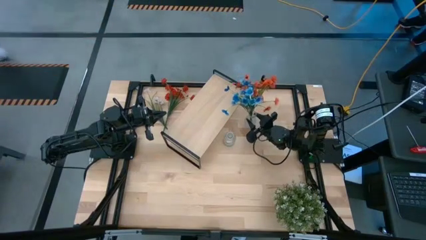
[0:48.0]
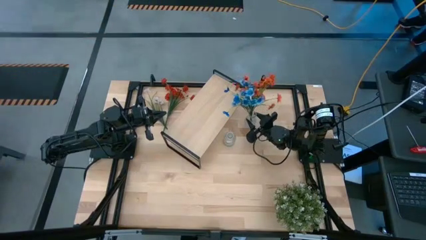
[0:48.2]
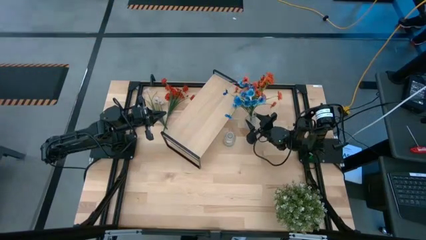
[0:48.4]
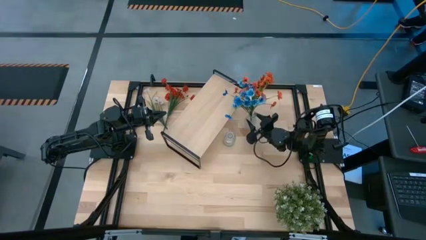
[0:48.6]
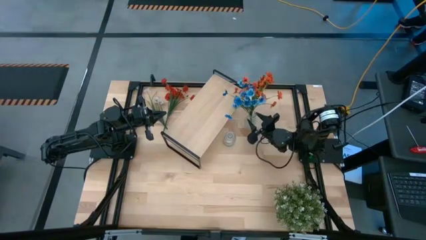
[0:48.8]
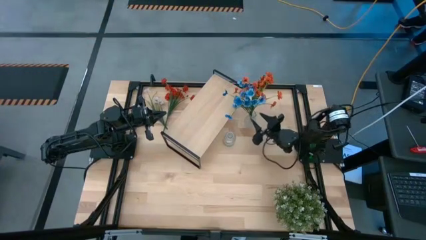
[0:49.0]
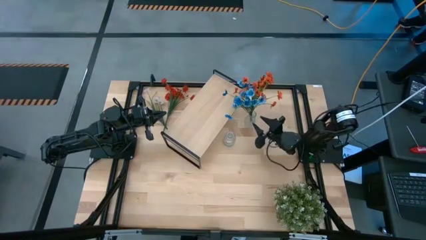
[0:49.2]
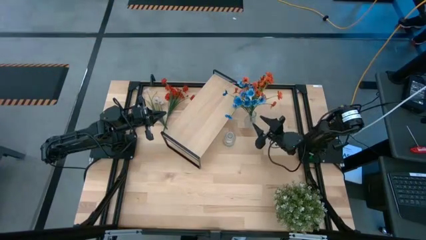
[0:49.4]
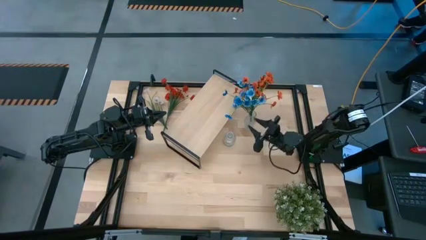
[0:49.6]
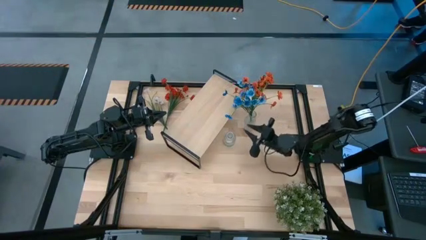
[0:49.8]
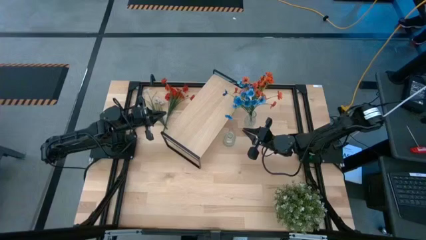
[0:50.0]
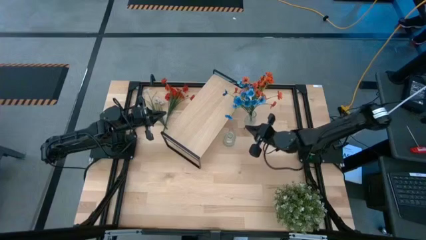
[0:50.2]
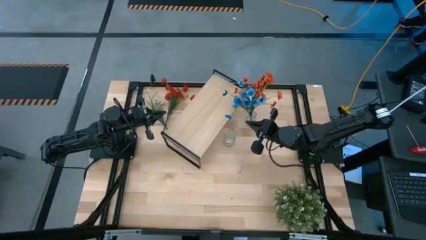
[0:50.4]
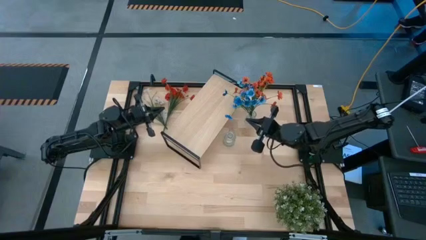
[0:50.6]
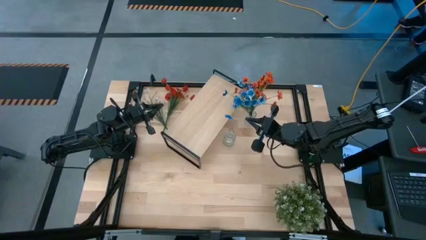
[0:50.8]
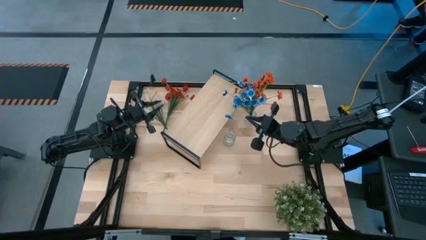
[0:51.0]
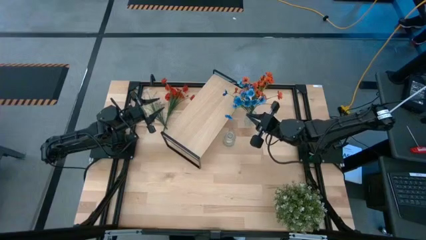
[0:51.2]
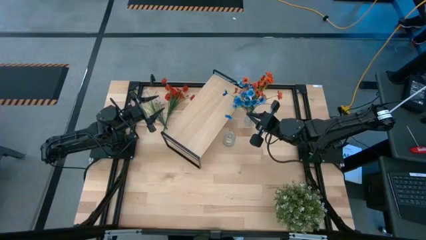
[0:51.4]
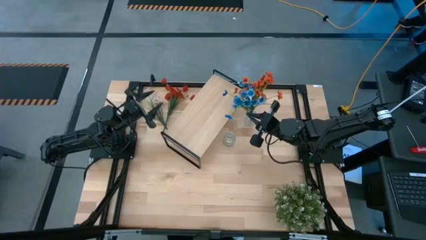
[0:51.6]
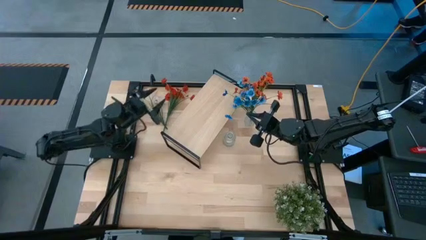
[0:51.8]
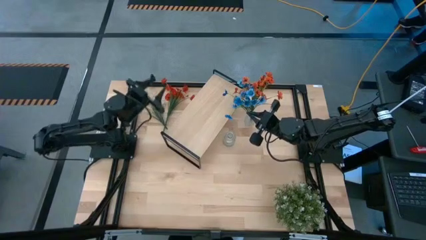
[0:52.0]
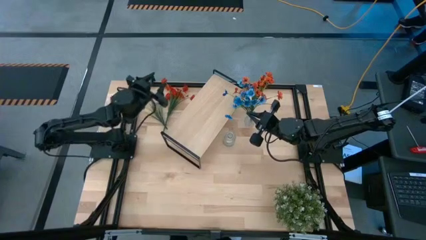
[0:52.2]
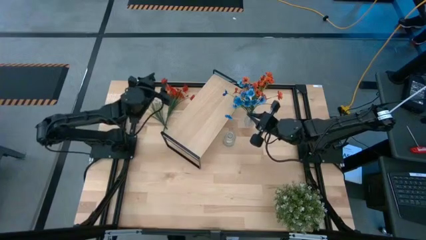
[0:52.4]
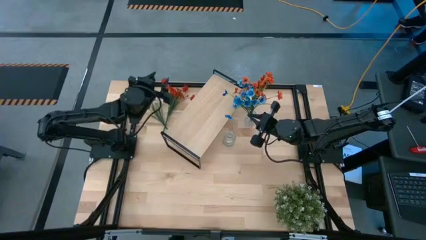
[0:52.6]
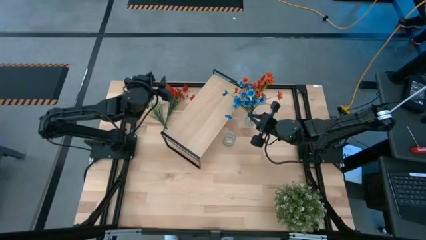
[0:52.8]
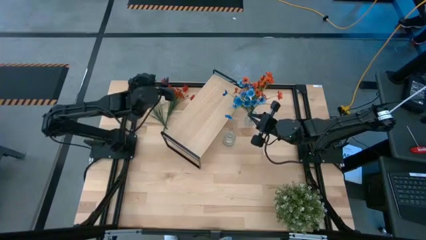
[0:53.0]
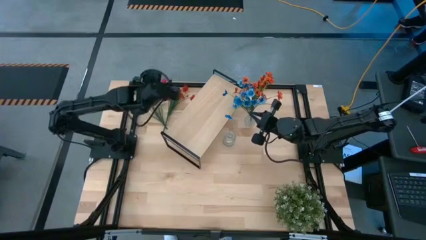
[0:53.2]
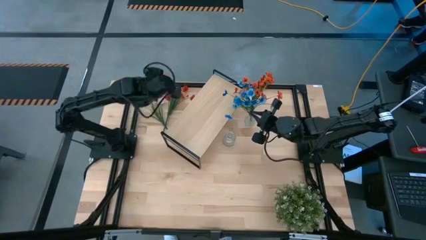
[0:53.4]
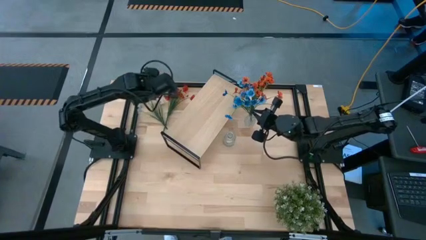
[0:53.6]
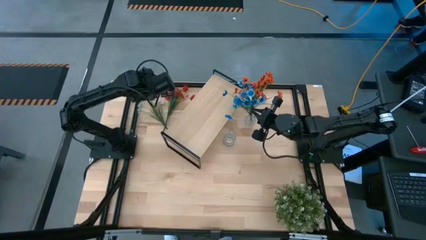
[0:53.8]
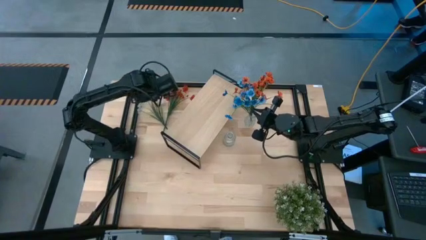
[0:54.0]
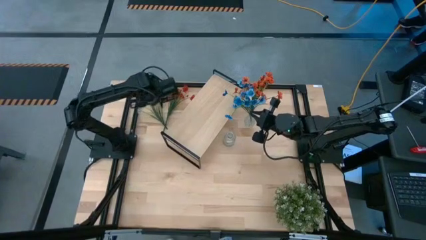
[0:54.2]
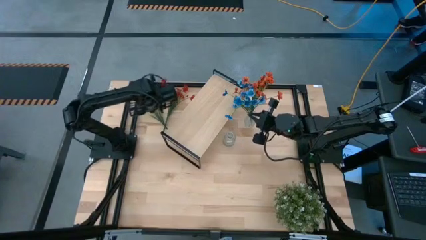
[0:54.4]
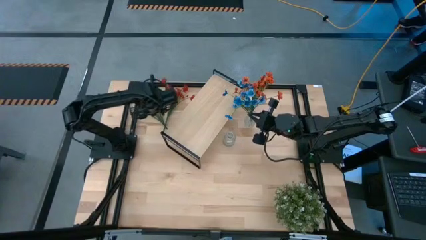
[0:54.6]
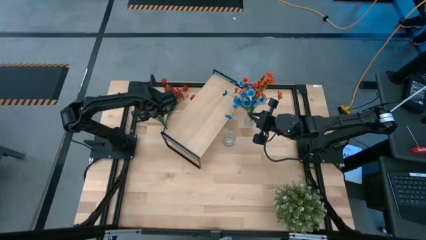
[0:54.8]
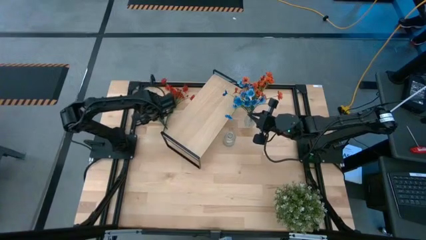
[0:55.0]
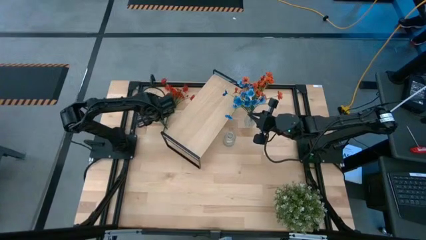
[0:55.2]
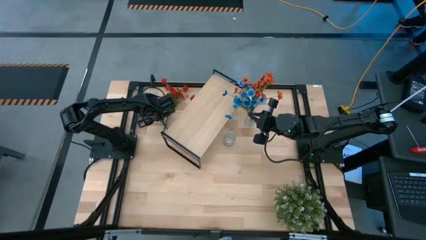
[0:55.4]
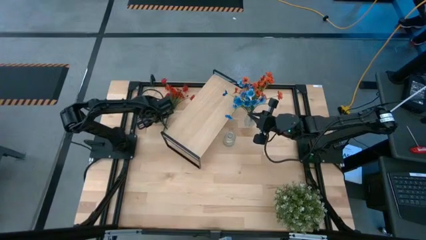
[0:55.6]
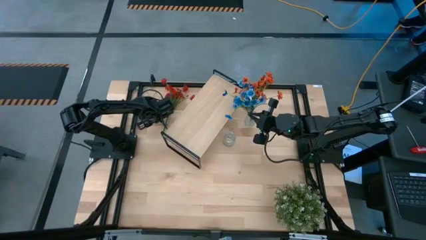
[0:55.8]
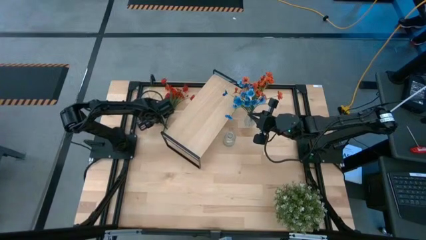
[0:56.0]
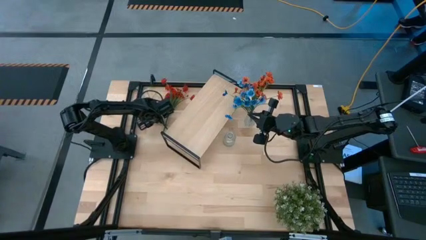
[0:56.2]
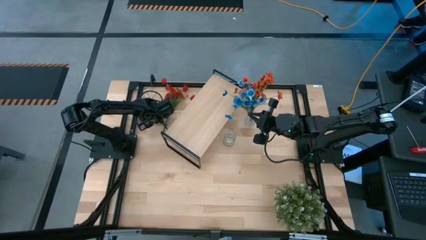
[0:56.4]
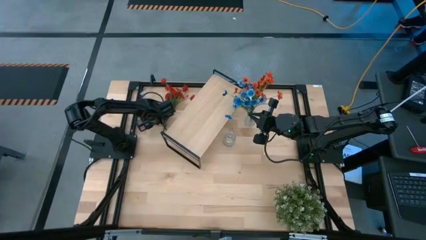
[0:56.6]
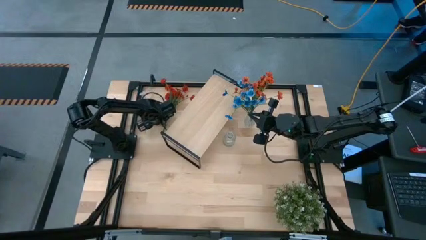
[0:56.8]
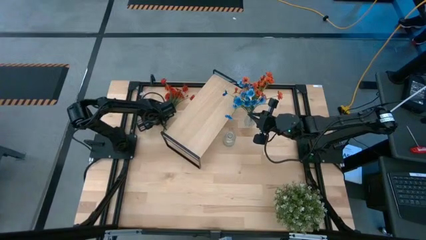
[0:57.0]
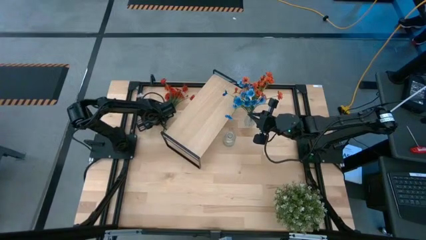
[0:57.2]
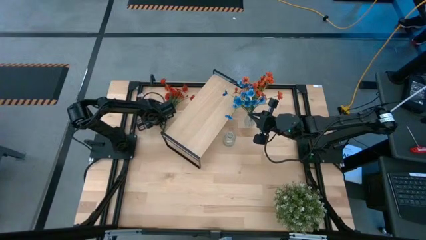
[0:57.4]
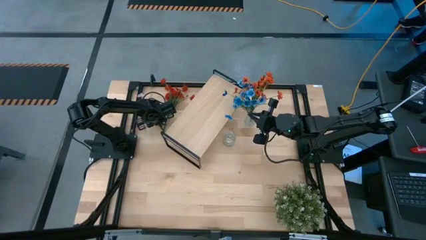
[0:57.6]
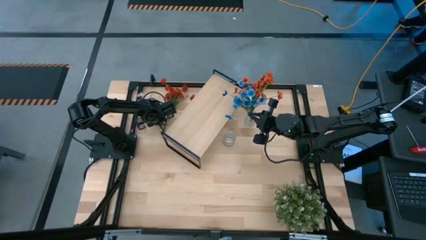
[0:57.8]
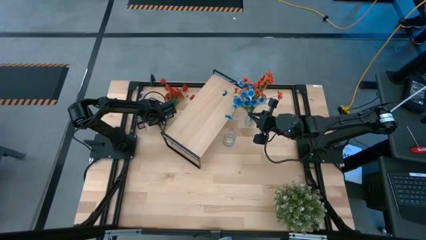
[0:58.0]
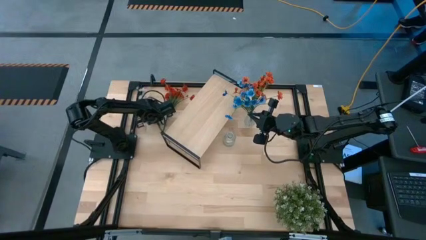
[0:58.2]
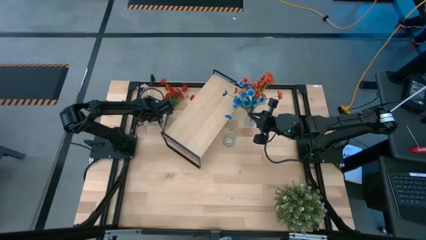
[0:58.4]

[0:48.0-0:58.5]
Task: Pick and place flowers into a vace then onto a shelf
Put the white flowers into the left transparent vase

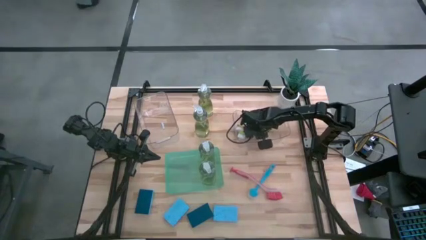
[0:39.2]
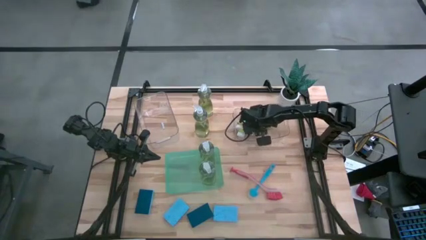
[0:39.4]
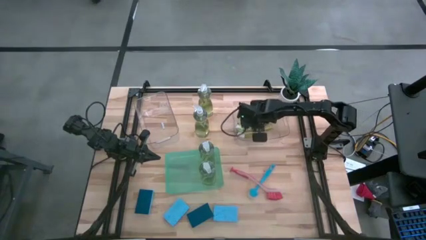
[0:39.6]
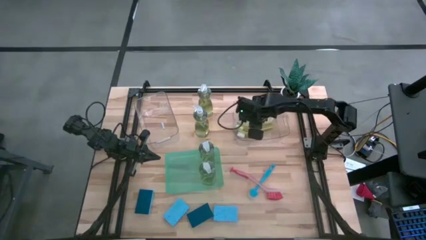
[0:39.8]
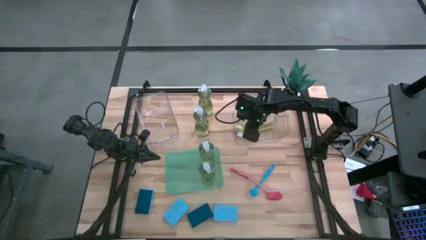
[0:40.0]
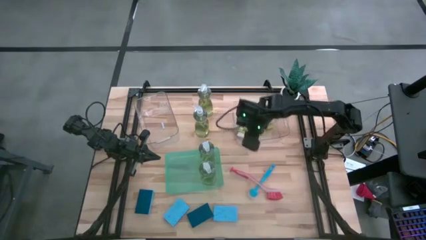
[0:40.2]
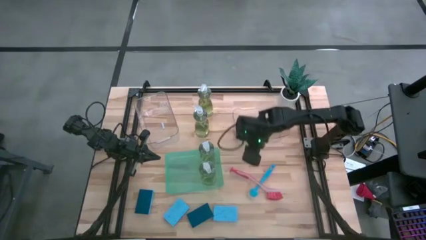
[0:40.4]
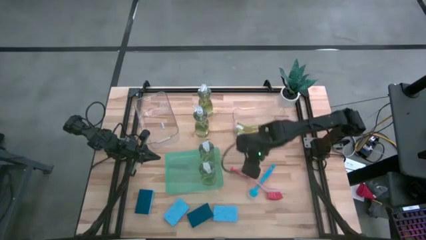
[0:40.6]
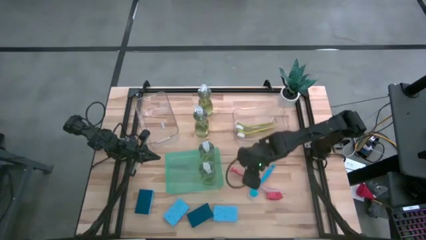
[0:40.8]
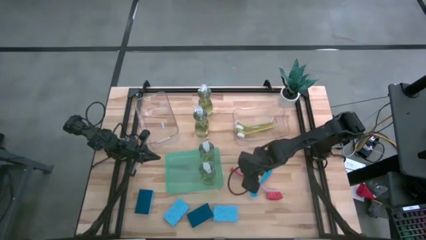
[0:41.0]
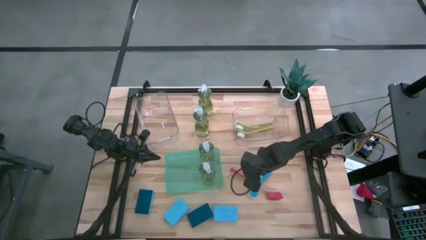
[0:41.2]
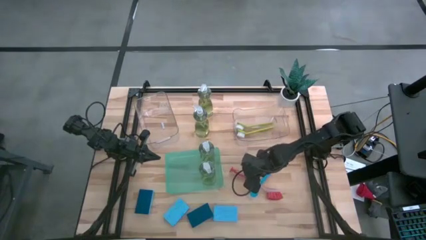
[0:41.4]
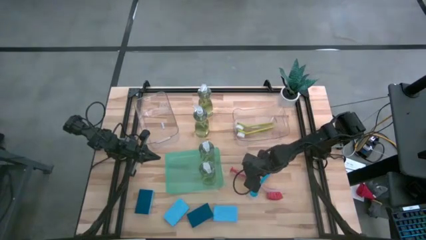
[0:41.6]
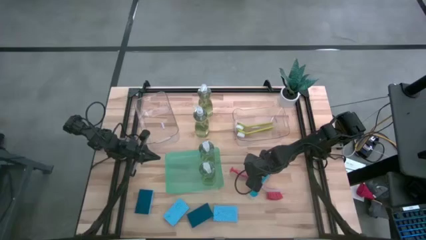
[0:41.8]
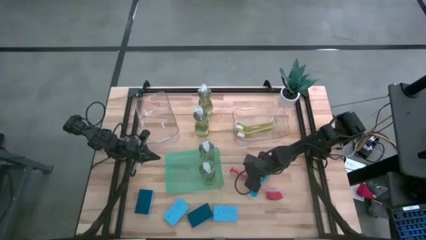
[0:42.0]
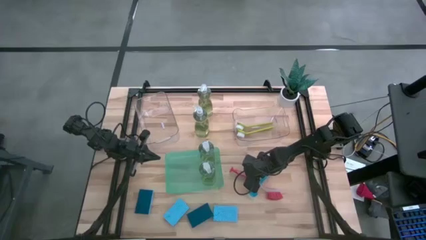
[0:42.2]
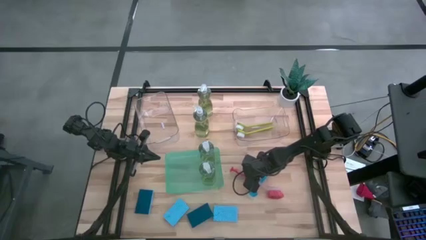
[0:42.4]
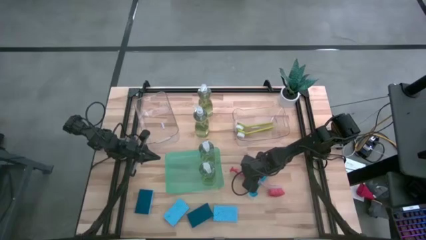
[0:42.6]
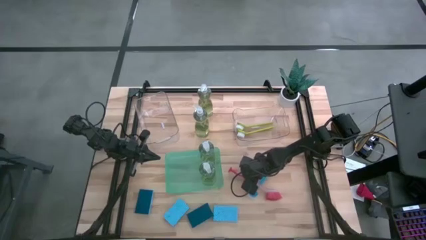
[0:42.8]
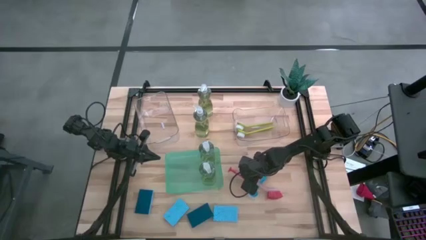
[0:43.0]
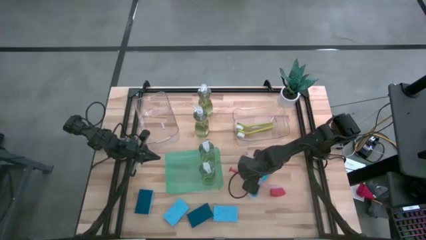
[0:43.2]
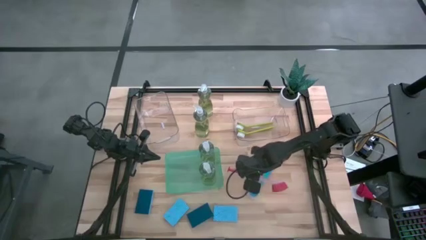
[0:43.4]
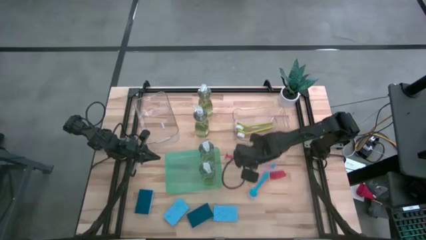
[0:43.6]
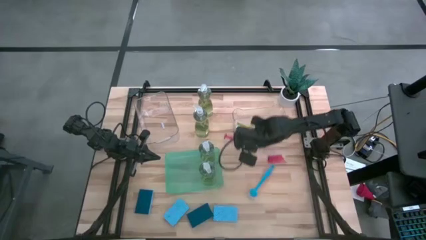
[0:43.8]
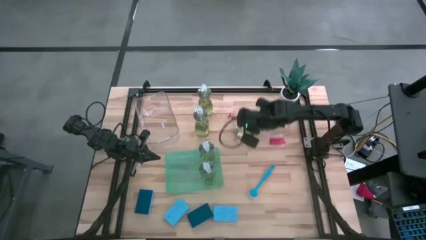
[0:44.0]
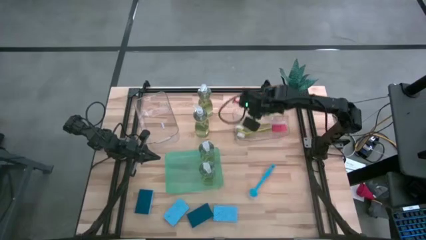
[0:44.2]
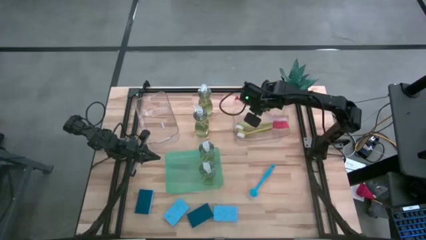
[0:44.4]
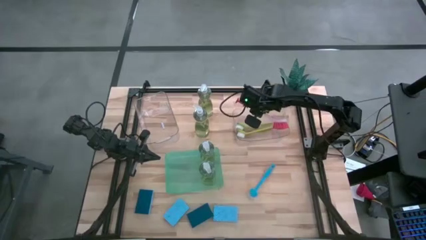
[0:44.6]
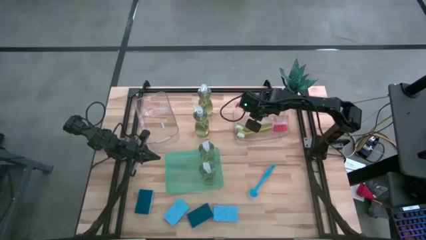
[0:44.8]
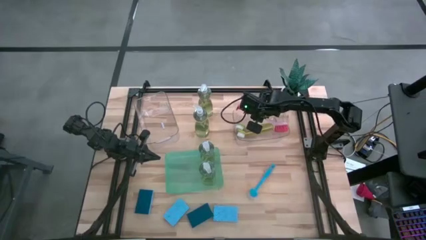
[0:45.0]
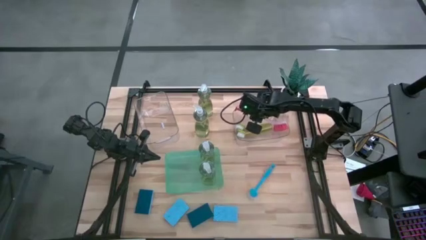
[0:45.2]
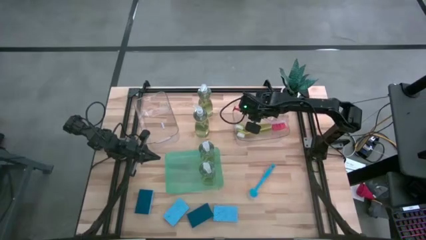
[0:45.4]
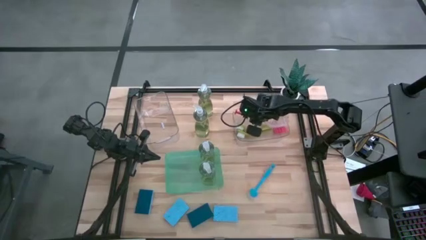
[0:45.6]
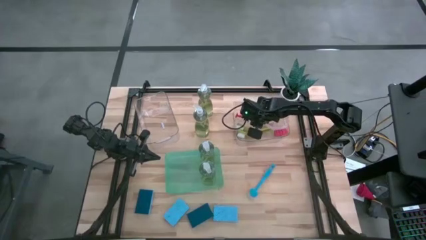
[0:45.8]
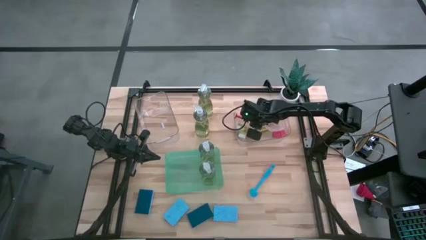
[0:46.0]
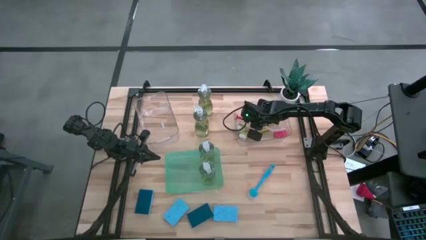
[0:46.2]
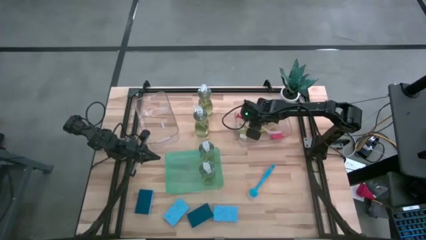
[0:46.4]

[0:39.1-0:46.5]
Task: Pick & Place Kitchen Sink Supplies
Put the red dish brush into the right transparent bin
